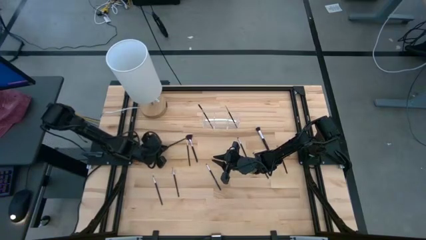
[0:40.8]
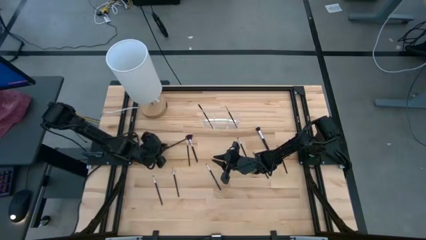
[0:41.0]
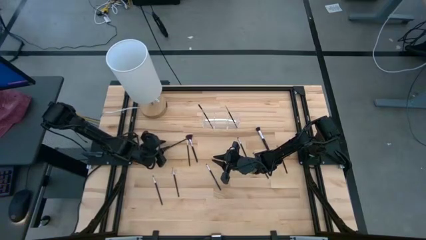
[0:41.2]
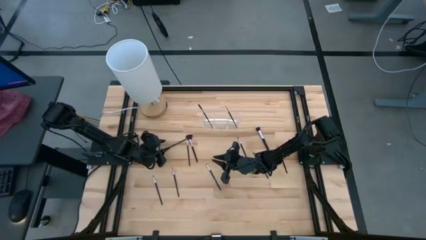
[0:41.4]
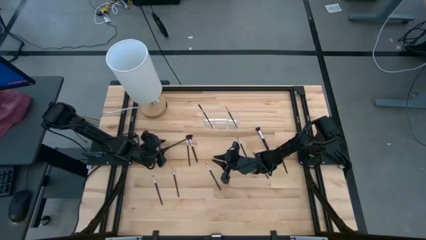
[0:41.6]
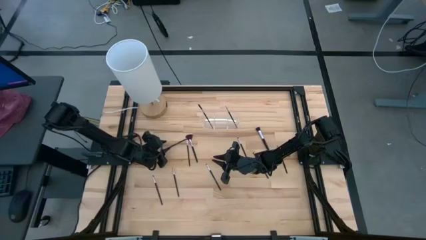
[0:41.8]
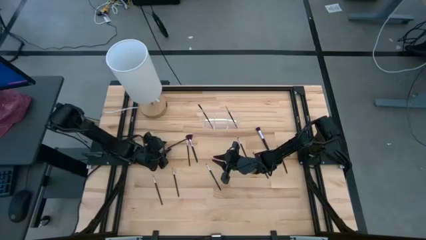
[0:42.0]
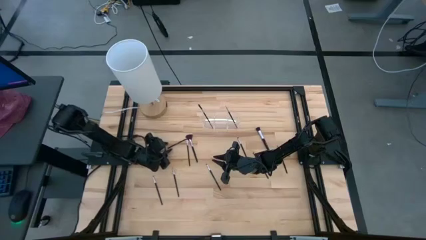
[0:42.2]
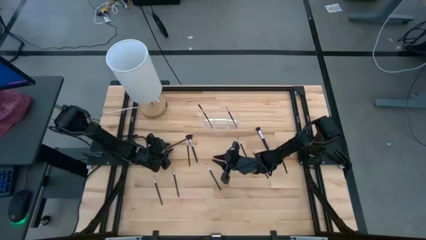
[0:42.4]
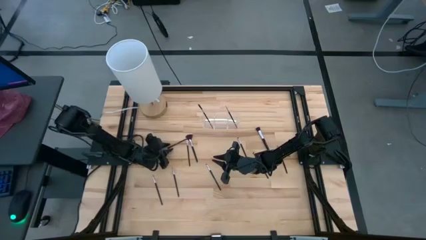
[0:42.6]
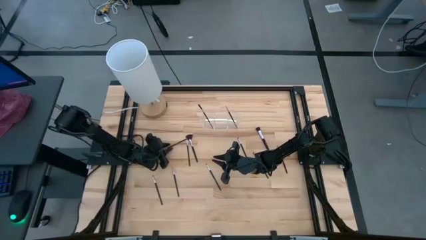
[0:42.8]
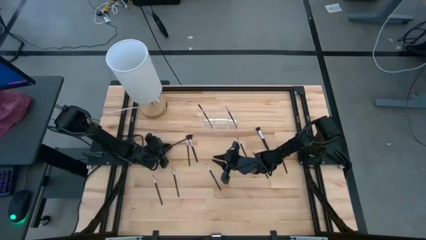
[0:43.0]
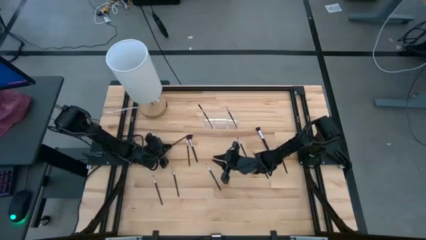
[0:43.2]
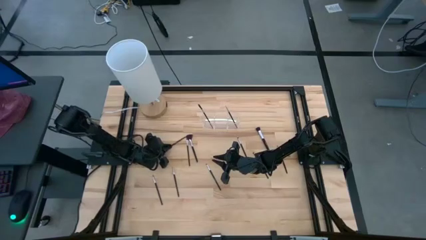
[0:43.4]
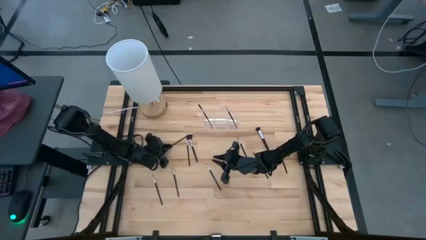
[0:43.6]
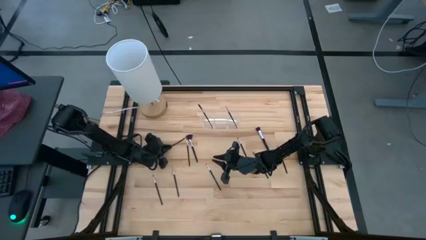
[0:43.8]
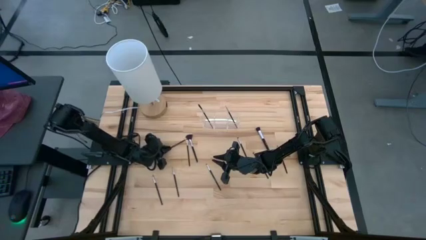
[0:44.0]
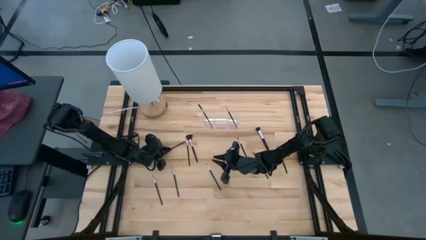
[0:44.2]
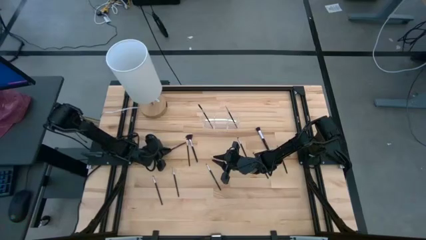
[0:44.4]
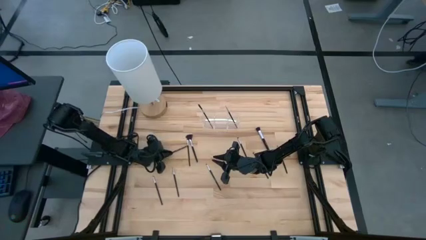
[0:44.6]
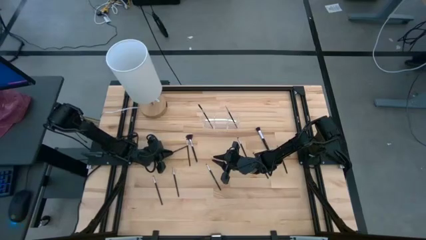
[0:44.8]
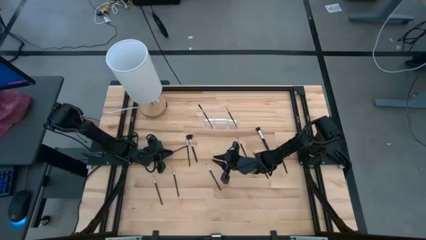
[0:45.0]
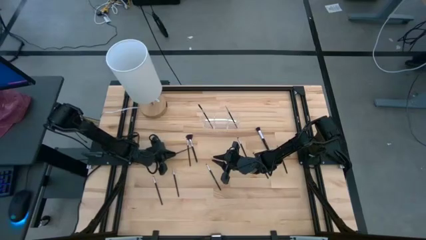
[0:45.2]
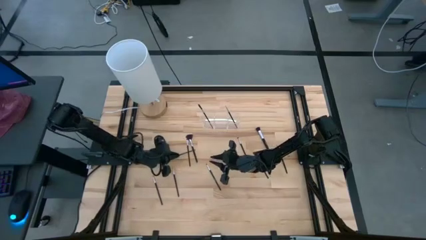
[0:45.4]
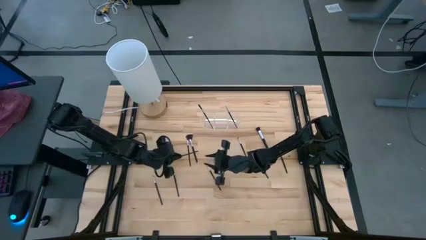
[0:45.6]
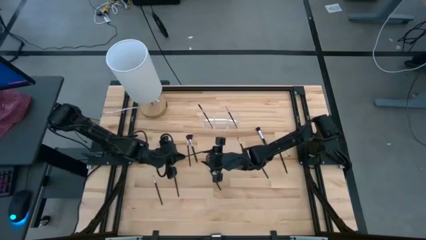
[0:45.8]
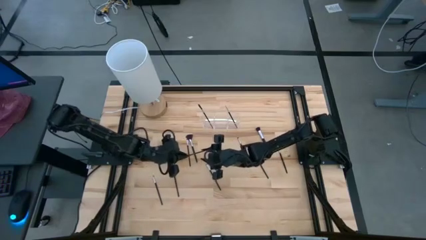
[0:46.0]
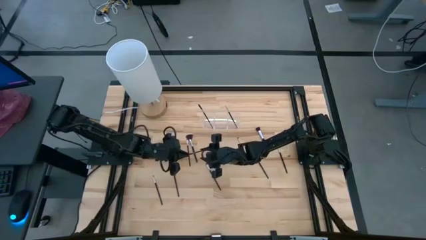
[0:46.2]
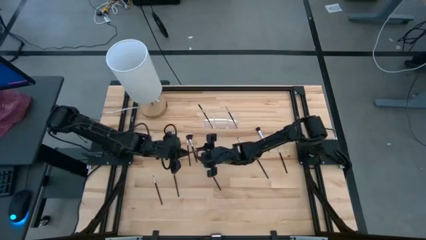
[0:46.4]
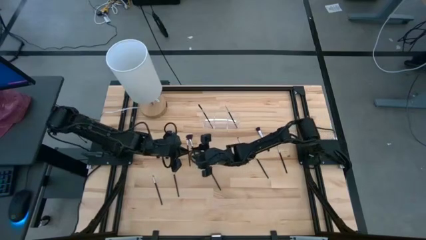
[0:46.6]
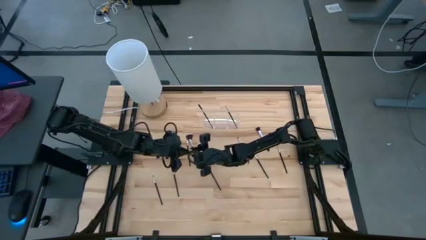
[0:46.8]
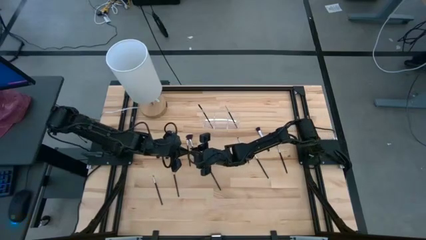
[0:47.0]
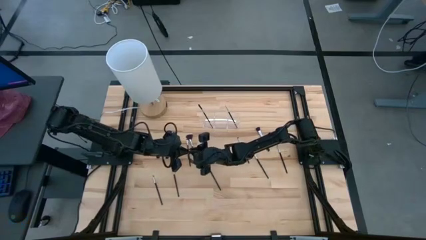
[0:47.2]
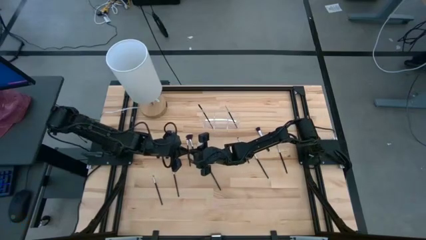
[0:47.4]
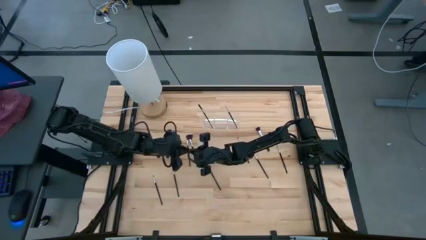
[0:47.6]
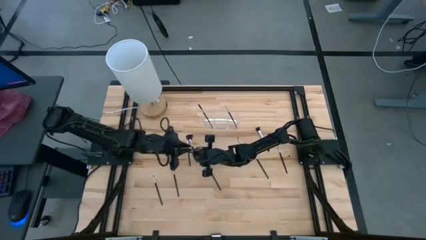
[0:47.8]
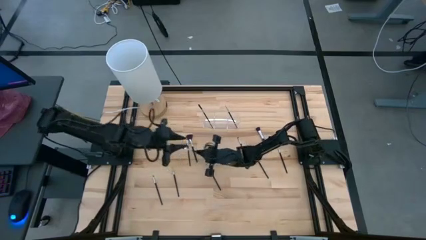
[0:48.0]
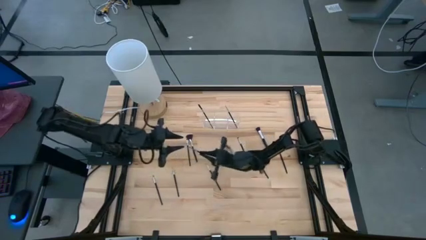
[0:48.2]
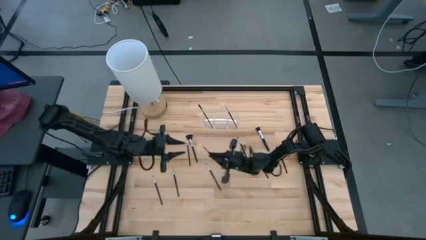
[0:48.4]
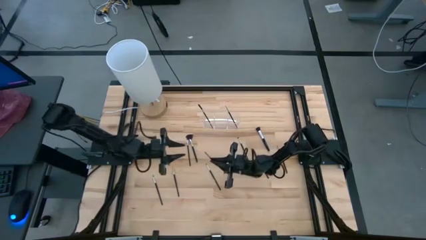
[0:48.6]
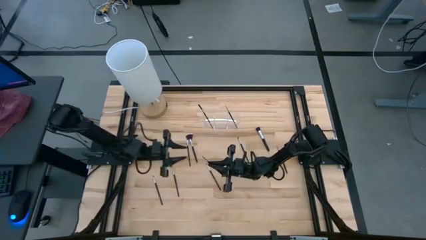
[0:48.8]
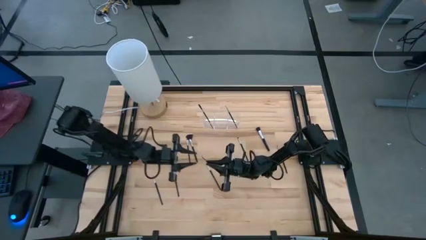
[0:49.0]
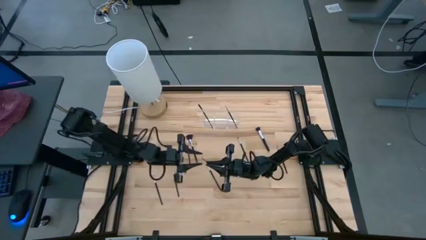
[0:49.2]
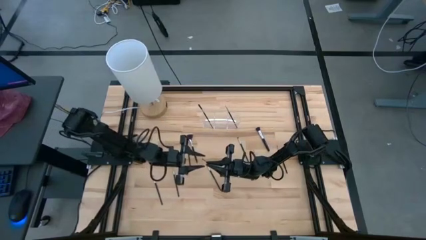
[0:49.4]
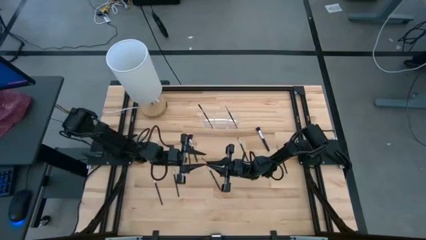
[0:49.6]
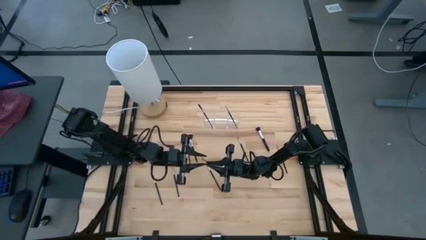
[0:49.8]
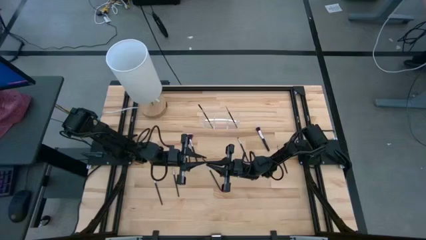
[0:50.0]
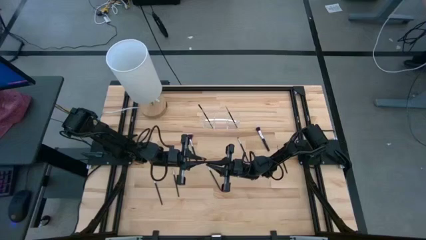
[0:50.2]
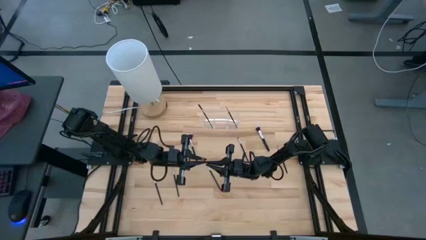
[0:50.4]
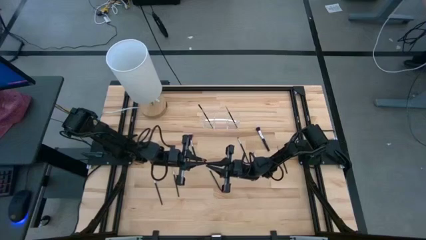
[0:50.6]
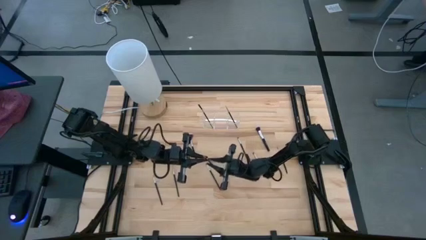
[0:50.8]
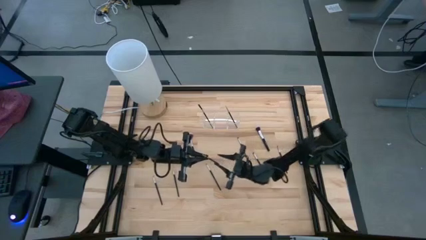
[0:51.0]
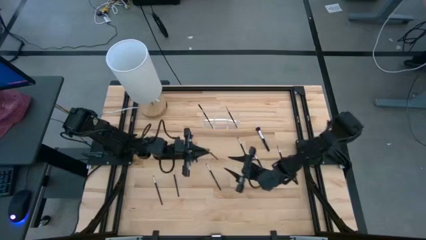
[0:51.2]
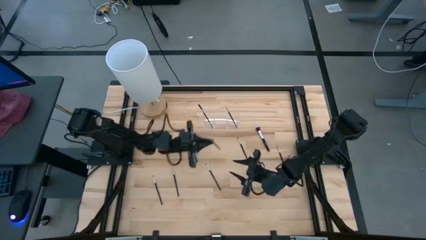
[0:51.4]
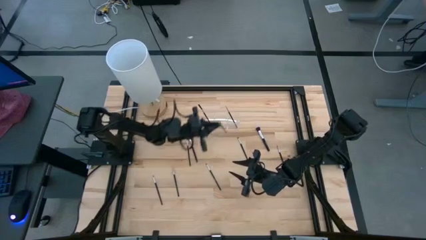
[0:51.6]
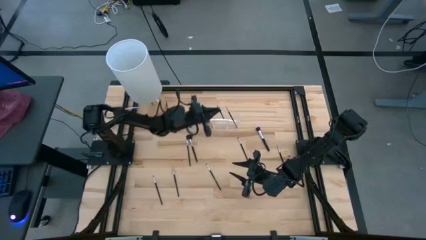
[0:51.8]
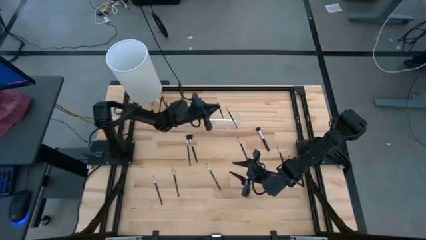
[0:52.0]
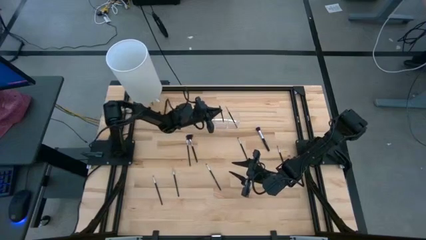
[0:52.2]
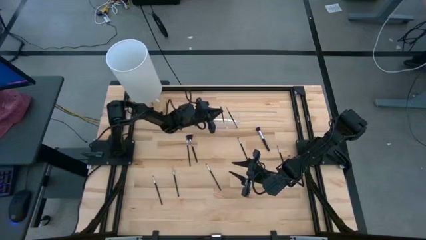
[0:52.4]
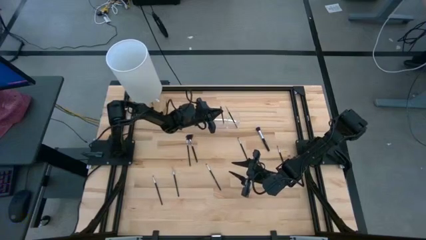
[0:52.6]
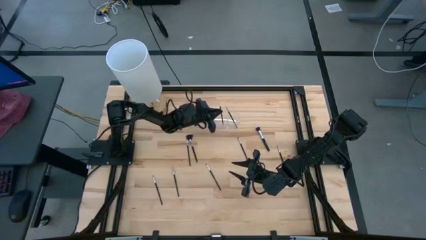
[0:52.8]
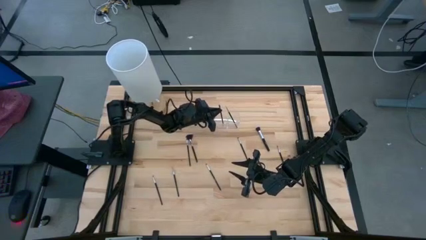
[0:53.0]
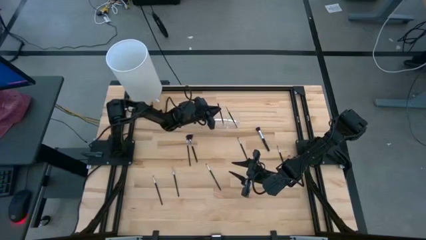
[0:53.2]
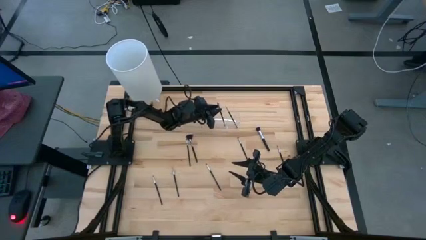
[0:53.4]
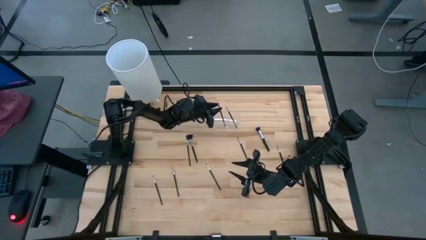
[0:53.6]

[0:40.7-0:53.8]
Task: Put items in baskets/containers
Put the black eyeshadow brush into the transparent organizer

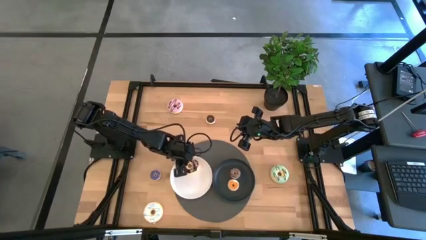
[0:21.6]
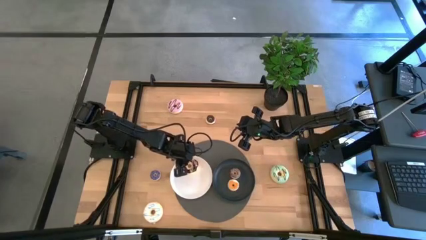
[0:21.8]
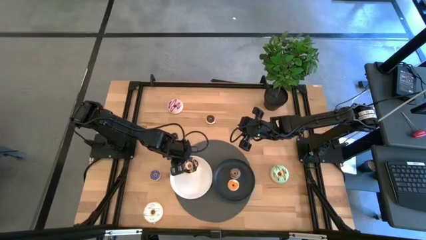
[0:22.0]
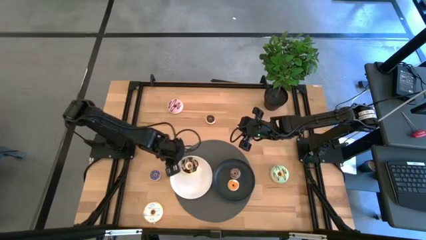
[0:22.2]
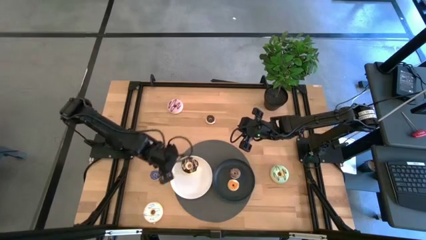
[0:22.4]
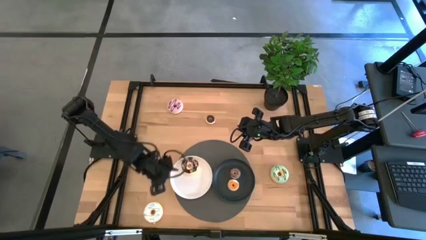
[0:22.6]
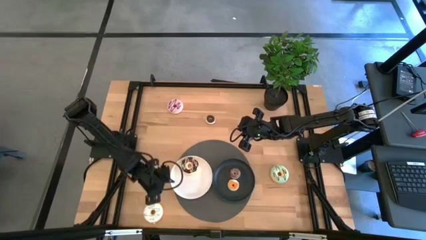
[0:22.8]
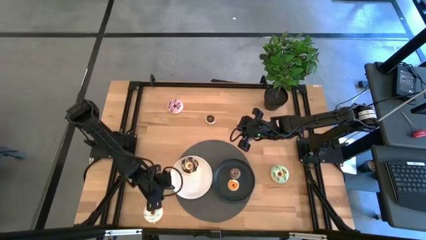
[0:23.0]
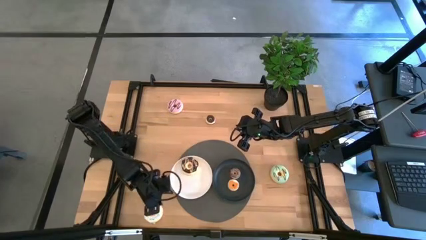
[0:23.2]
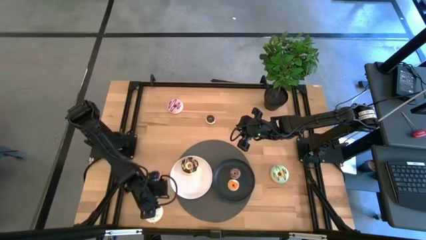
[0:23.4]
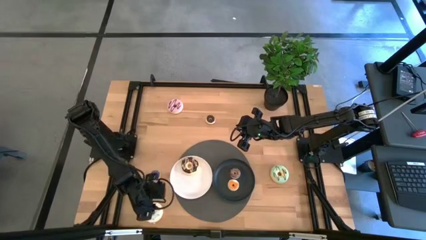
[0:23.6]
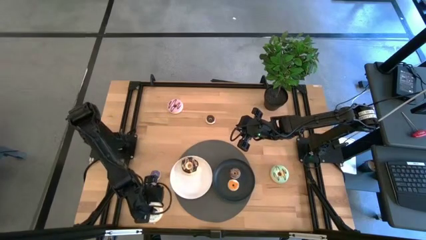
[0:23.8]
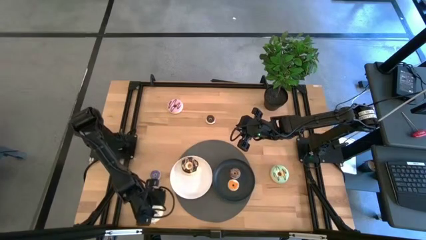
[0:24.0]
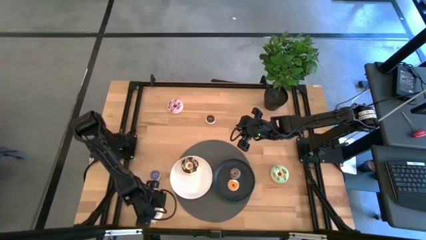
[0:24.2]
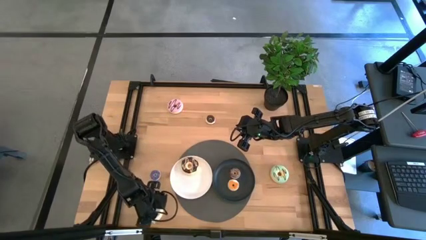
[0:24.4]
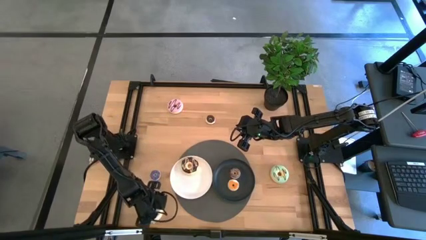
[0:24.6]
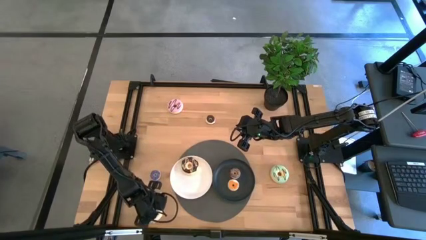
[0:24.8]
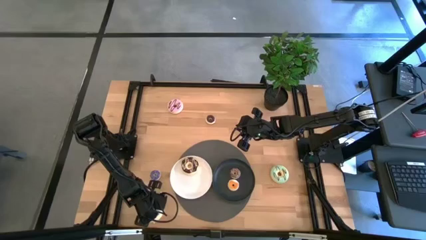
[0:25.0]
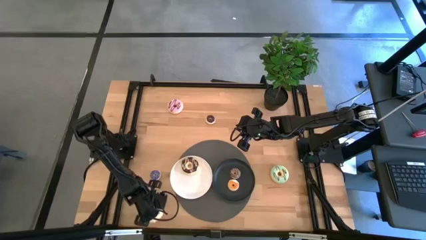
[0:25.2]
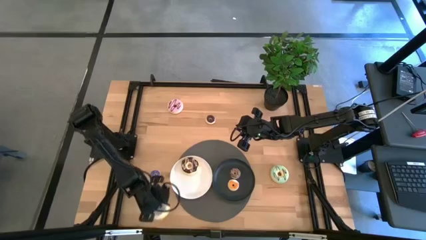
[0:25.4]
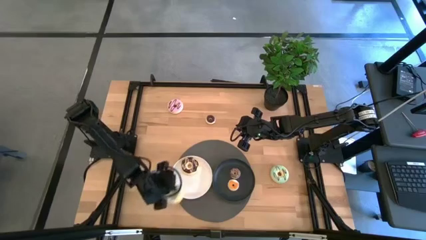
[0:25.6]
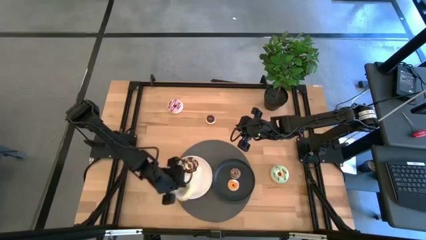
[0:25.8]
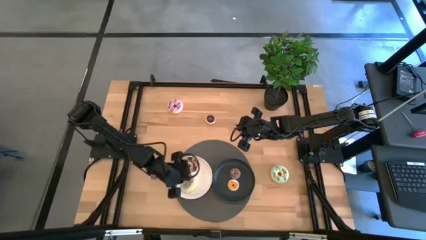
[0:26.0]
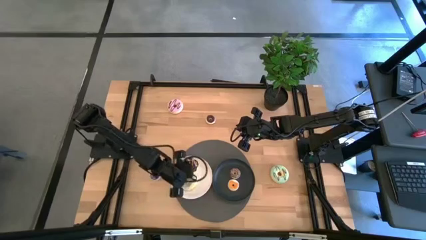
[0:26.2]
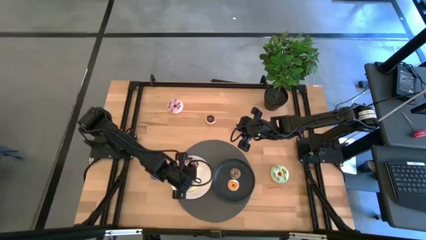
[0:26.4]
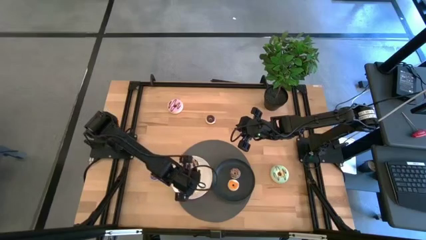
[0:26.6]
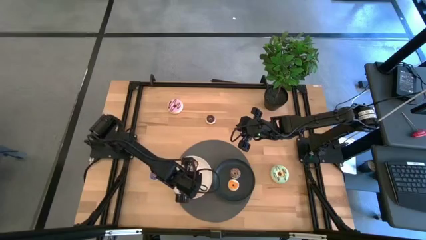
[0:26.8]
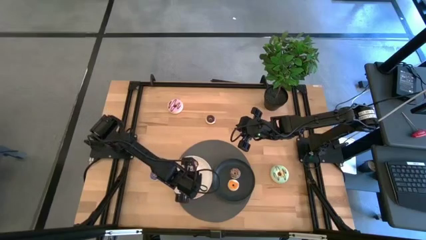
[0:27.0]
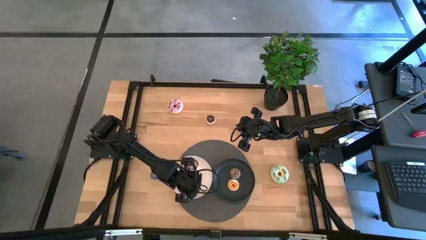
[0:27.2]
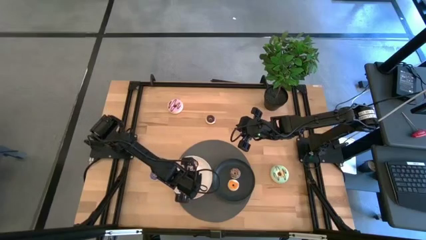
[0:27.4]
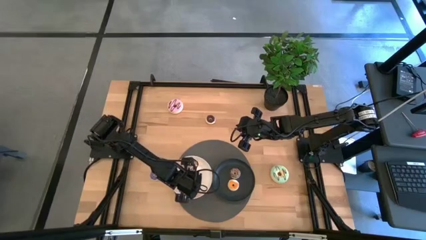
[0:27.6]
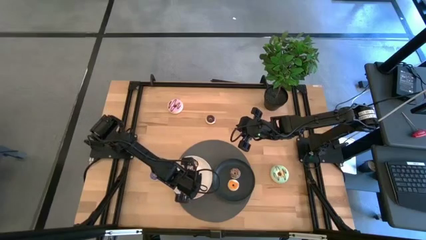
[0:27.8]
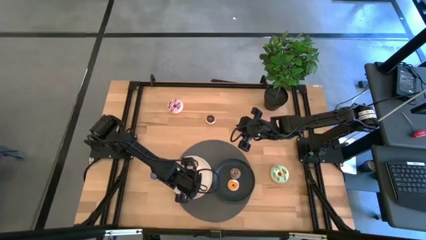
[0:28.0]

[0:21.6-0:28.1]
Task: Pick & Place donuts
Put the big white donut on the white plate
